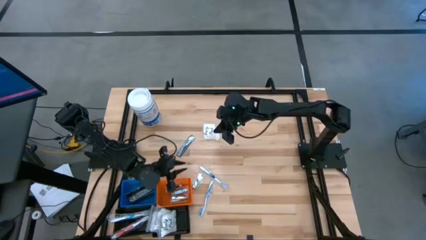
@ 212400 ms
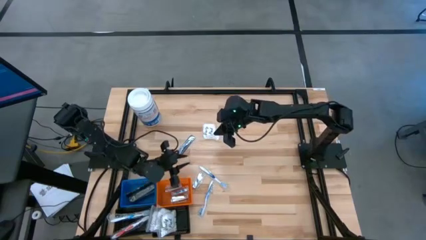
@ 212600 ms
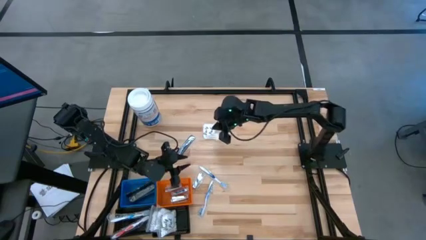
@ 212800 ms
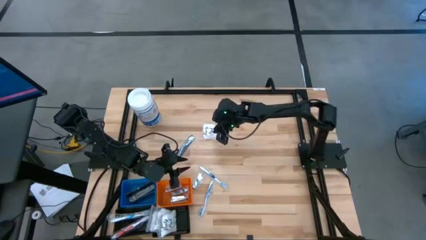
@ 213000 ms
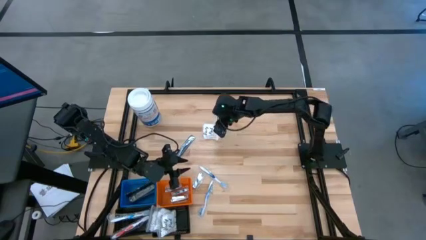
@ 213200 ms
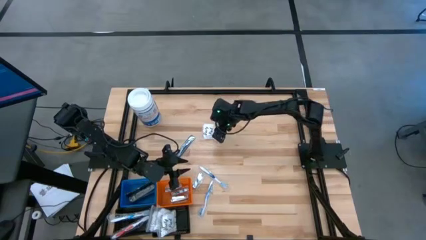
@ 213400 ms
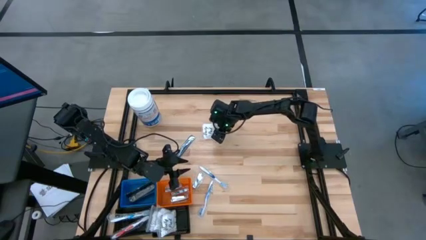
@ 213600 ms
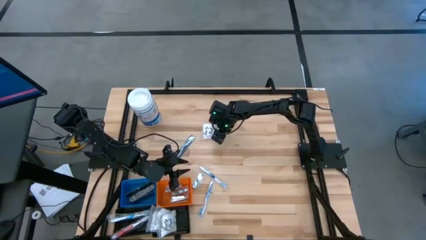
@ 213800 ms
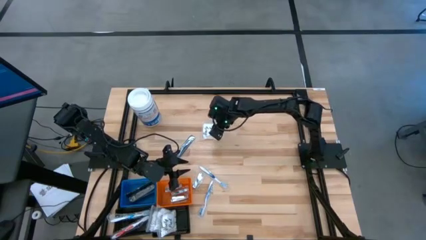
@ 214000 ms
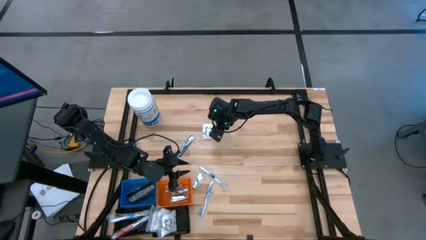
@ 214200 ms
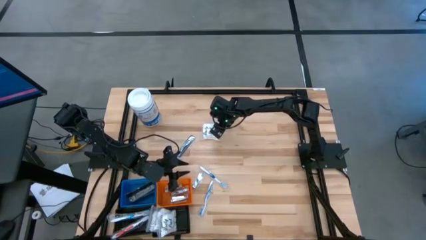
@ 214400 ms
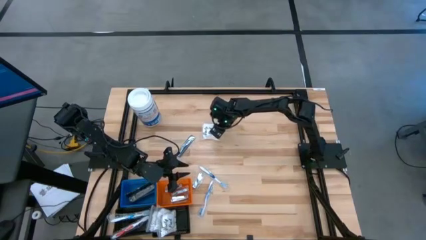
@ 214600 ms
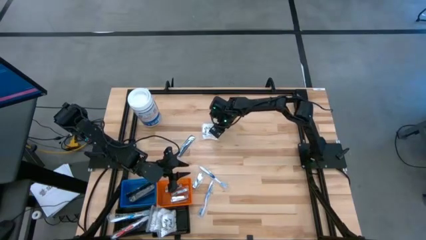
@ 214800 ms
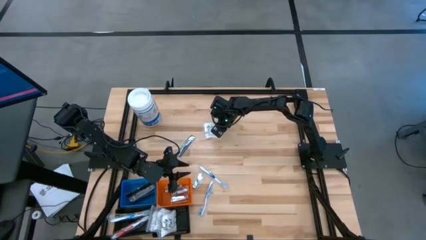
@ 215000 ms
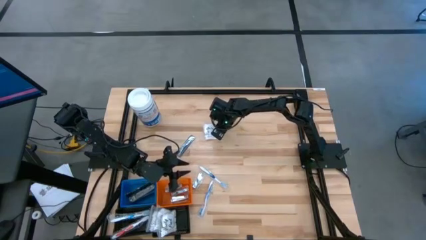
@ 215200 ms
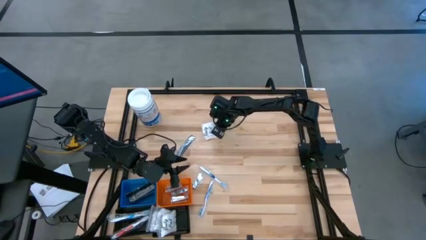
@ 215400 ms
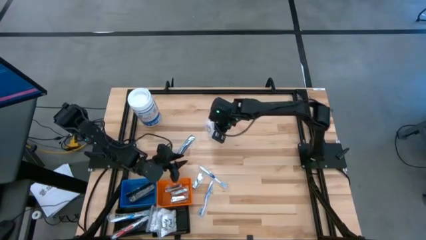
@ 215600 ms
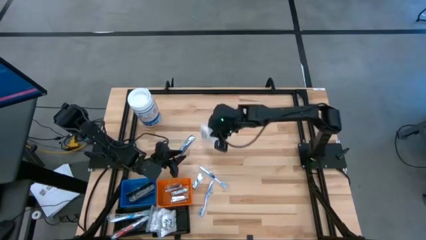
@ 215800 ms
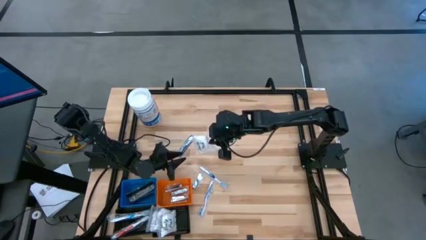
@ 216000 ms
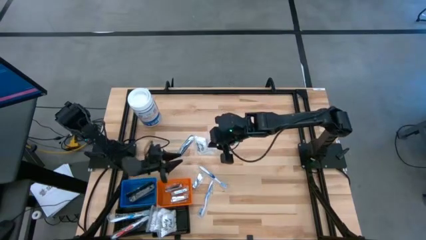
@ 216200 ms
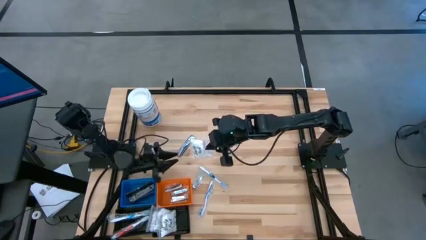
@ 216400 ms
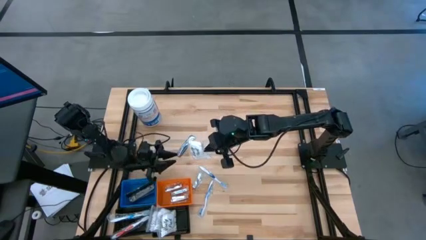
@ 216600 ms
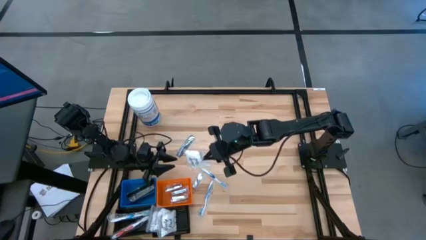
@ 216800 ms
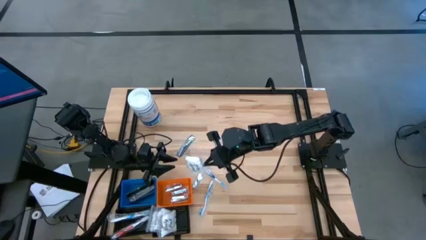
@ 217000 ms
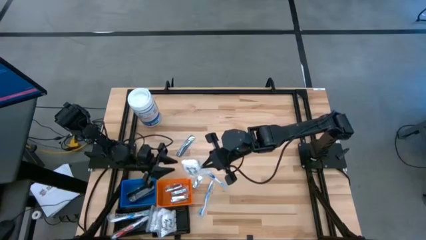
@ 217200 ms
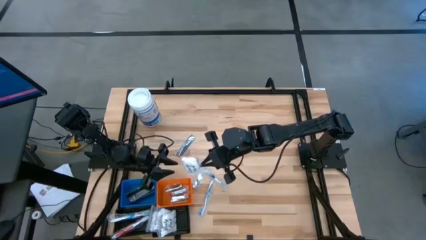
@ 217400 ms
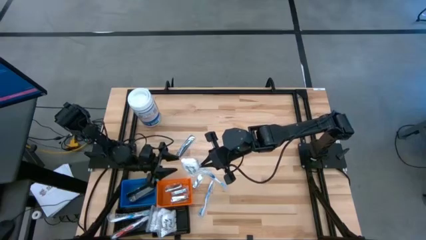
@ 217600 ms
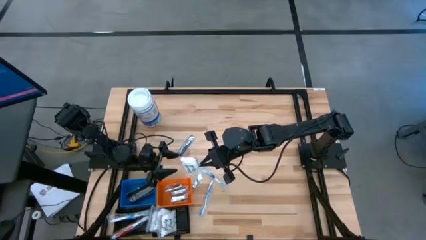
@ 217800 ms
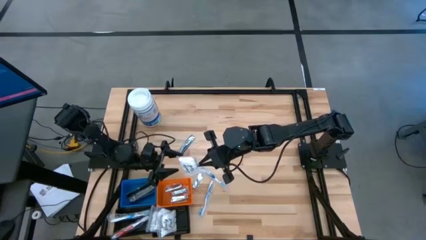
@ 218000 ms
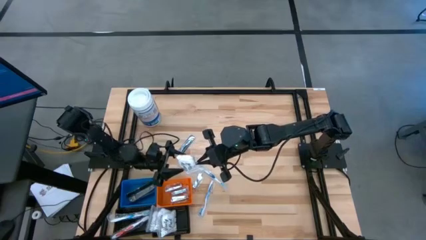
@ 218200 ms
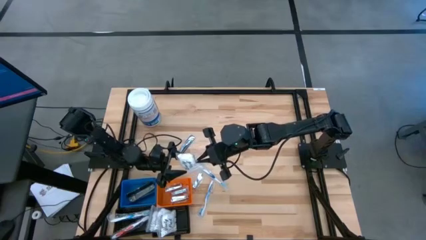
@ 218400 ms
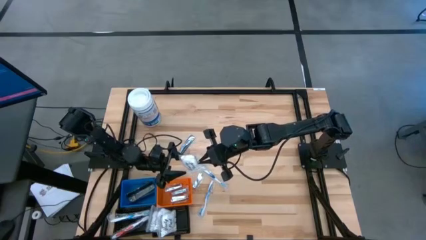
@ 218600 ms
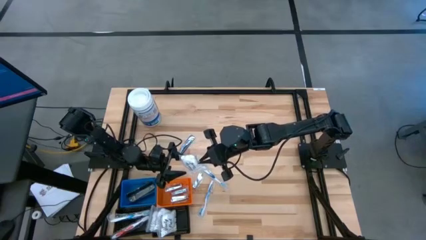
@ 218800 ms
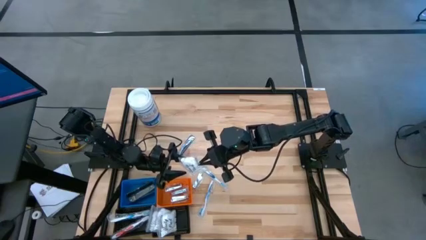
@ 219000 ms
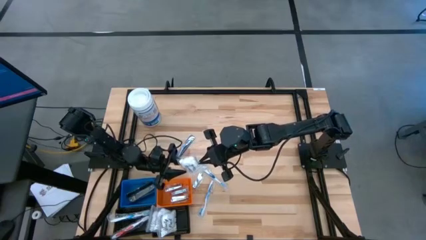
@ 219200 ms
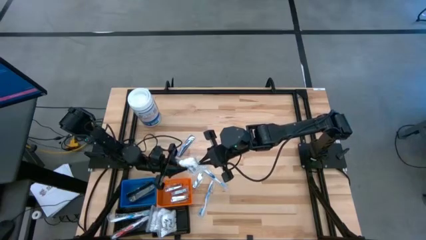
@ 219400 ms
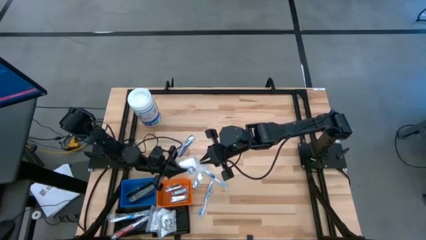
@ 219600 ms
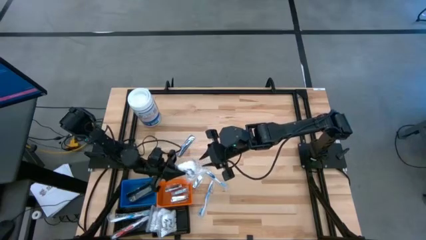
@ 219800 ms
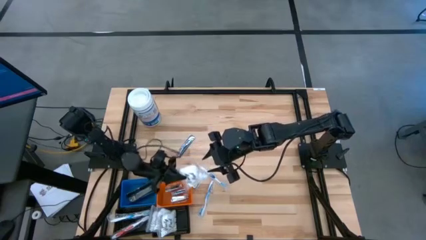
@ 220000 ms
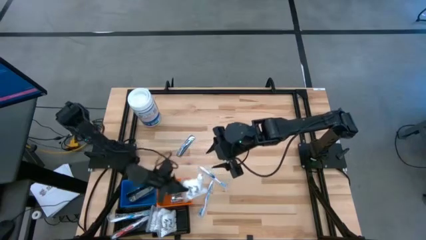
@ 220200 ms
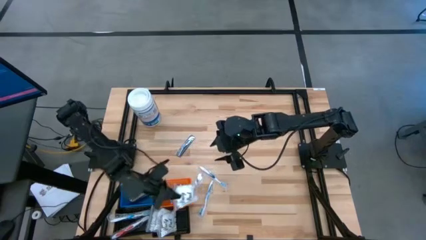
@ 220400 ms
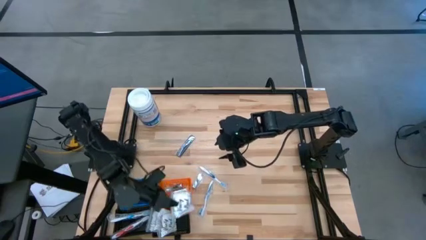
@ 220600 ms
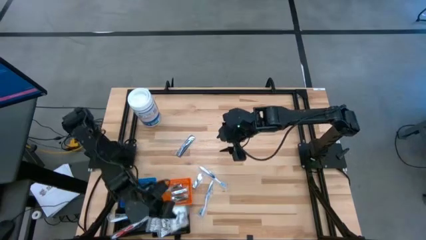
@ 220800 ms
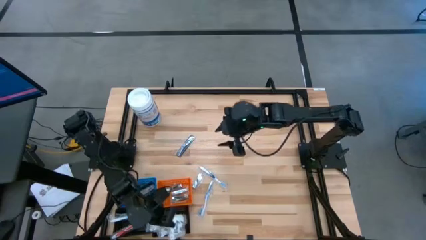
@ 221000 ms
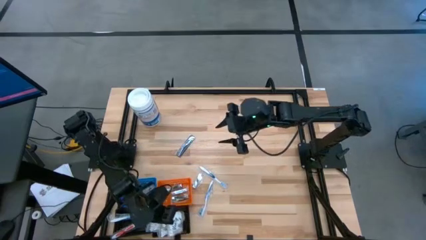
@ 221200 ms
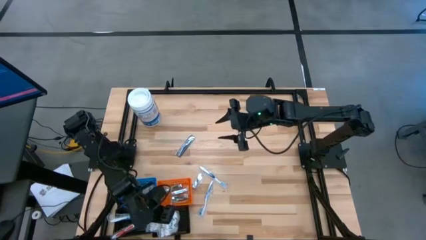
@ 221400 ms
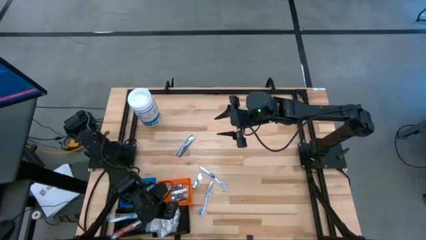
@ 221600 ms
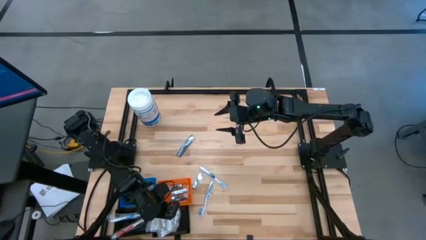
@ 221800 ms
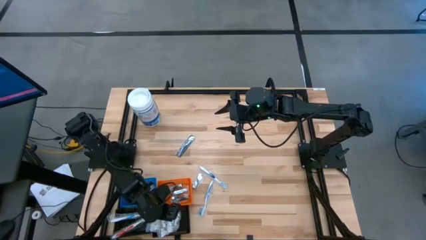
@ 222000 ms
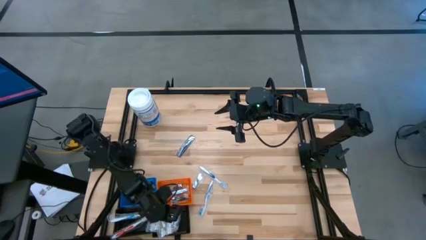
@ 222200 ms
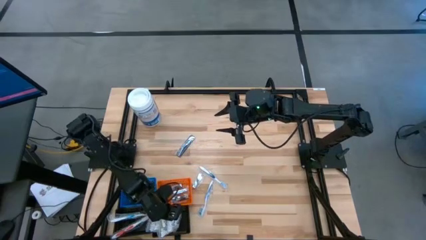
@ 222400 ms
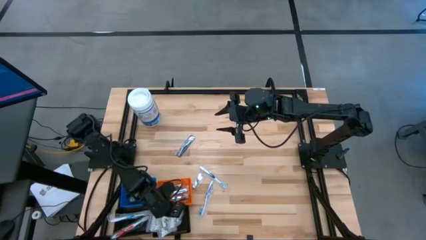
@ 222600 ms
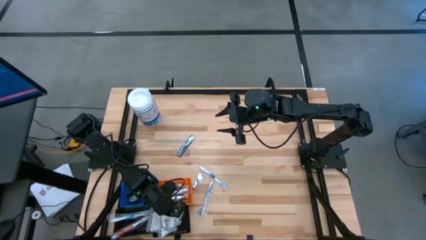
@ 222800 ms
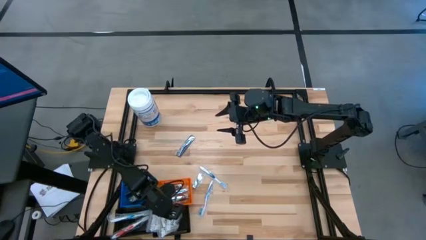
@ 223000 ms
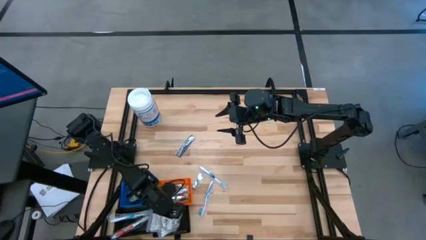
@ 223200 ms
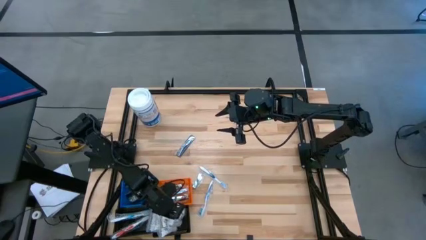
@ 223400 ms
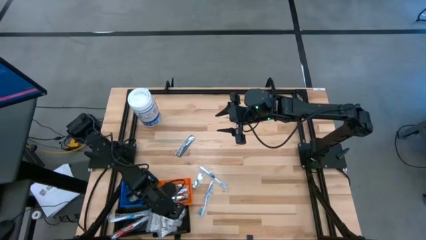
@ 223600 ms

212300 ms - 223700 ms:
Task: Pick & Place Travel size toiletries
Put the cotton pack into the right black basket

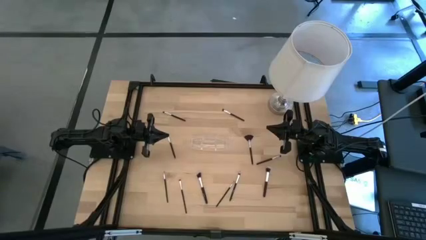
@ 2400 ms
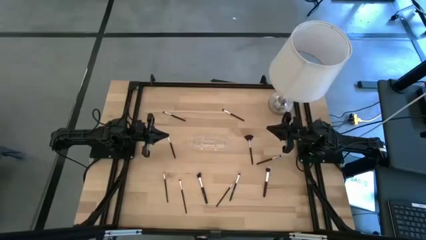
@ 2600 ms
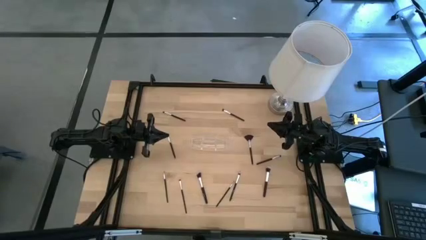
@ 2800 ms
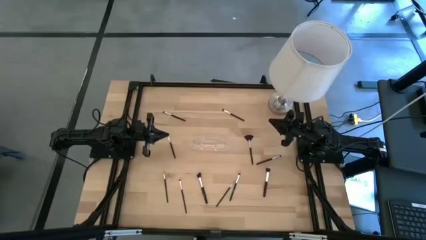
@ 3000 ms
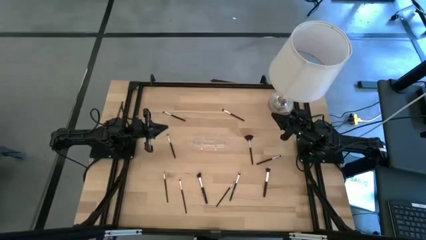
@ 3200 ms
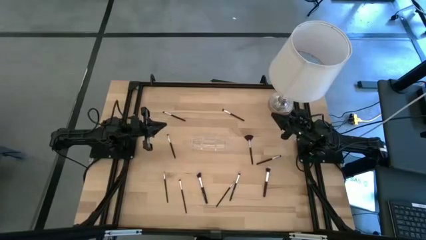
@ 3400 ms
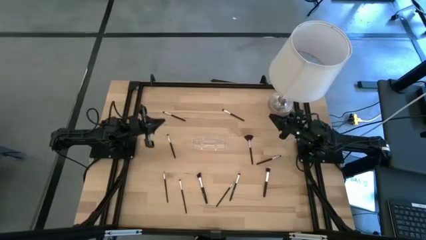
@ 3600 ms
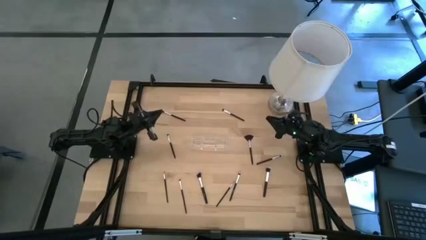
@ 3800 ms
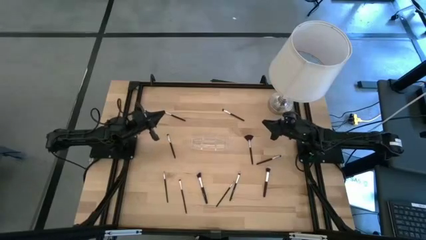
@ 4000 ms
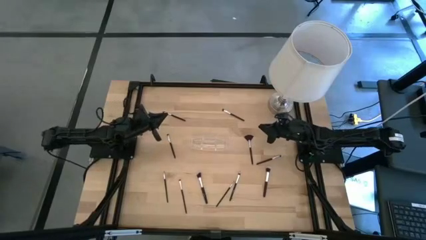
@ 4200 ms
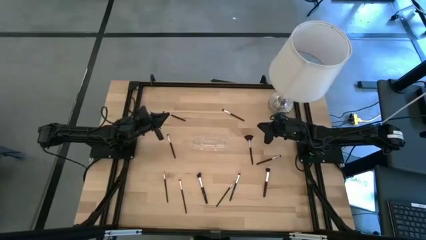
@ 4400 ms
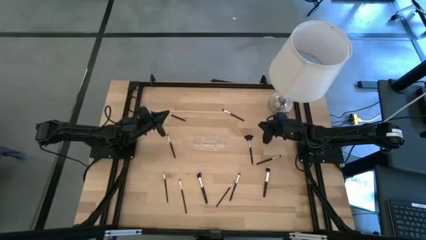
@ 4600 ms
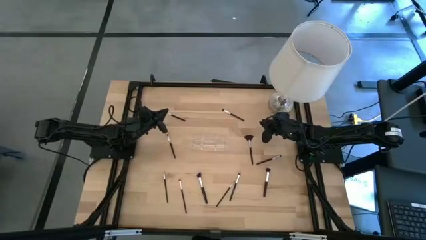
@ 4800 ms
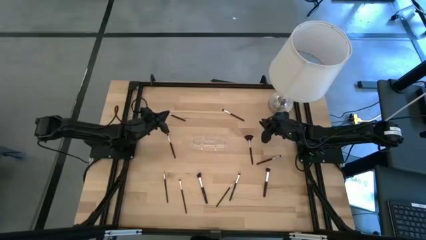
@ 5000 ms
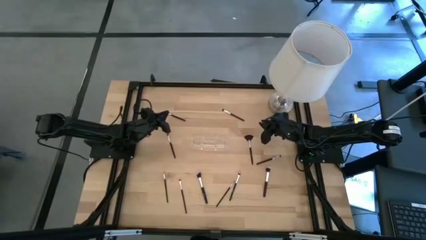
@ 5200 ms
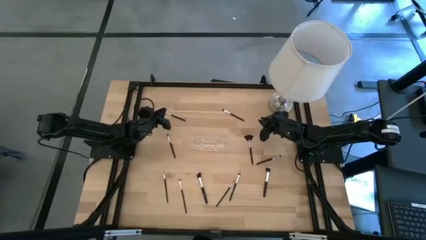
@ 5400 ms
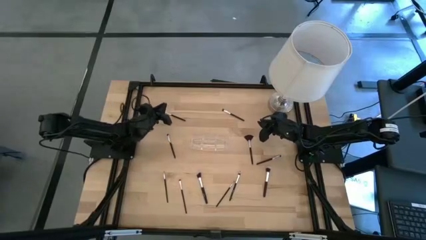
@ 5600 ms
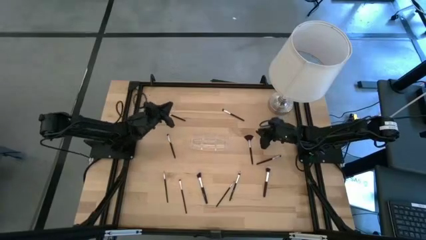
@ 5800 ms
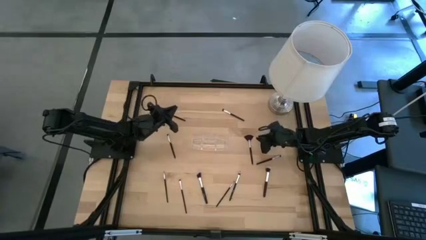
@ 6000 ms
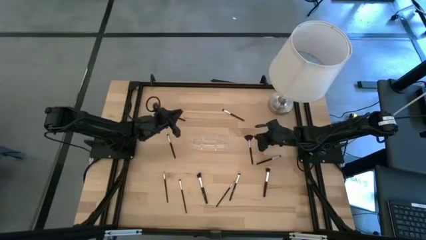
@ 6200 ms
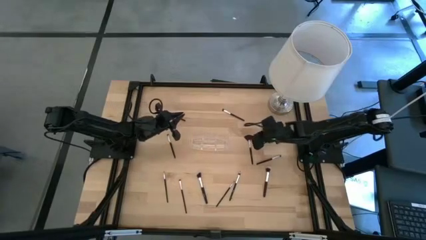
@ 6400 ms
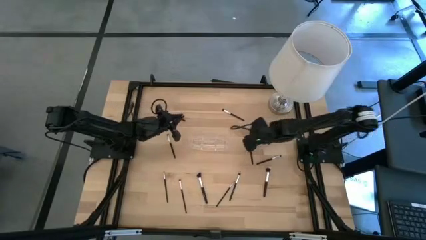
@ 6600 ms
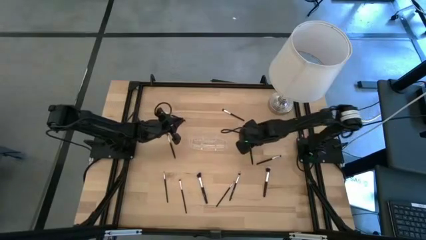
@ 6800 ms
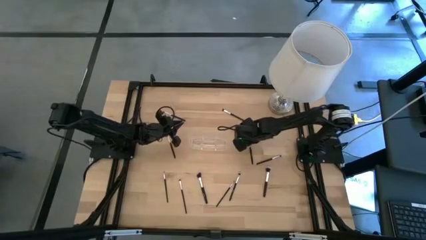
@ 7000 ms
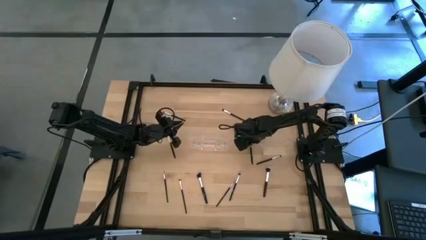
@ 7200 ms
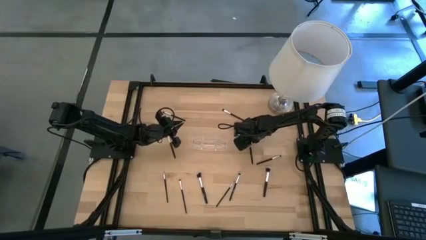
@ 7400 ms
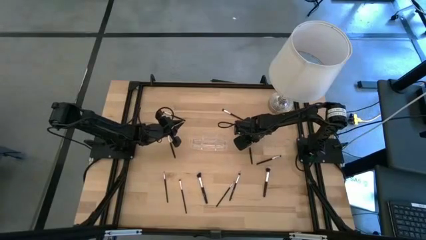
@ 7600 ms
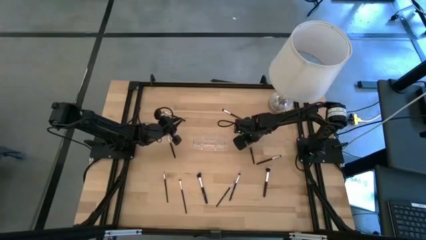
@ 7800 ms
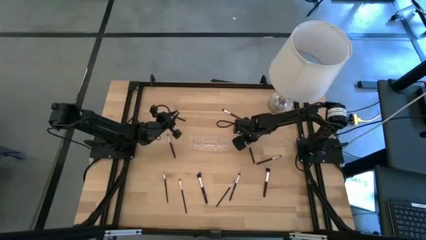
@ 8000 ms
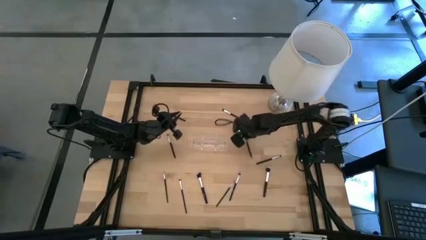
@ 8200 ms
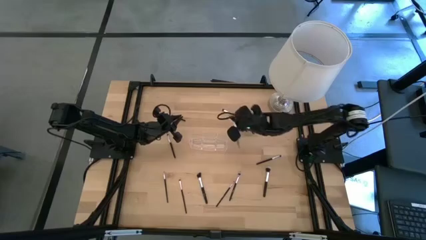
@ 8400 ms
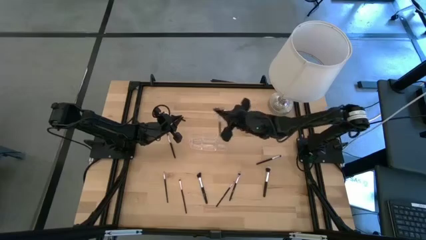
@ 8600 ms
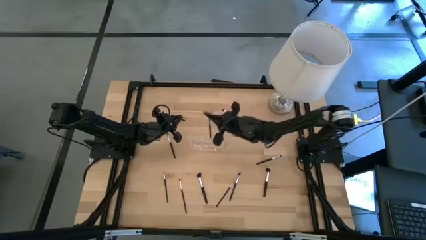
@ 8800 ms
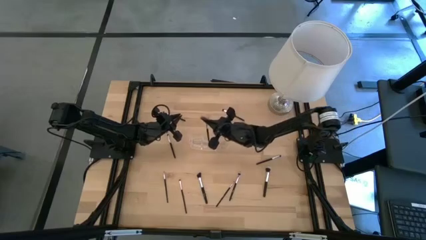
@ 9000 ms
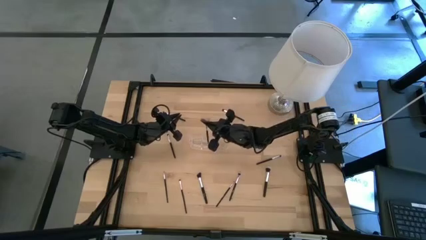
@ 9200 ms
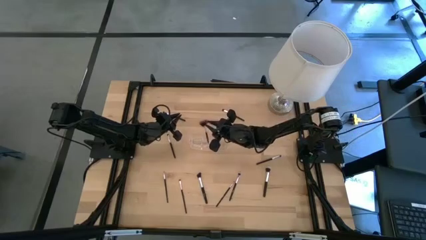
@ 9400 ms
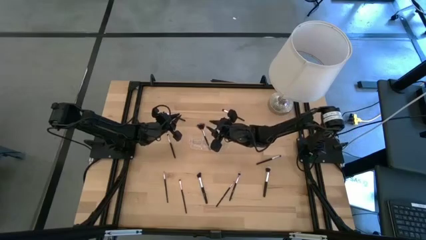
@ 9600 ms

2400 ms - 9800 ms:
Task: Put items in baskets/containers
Put the highlighter brush into the transparent organizer
